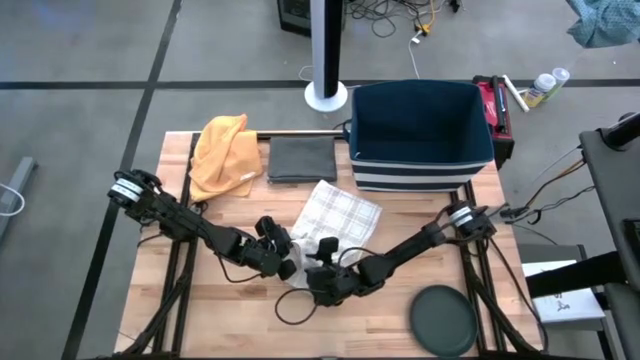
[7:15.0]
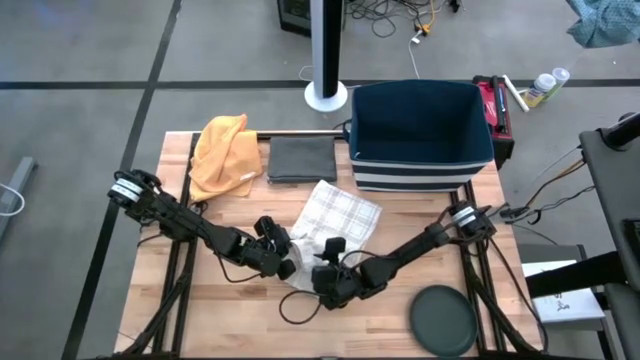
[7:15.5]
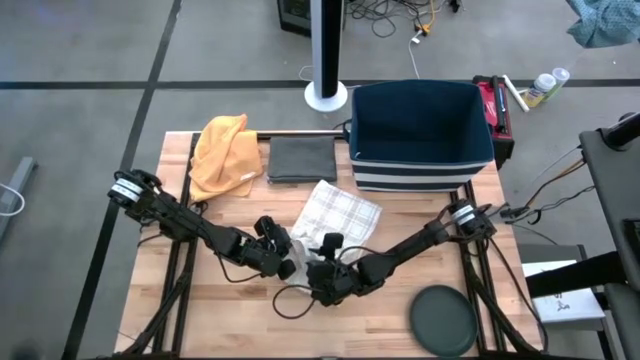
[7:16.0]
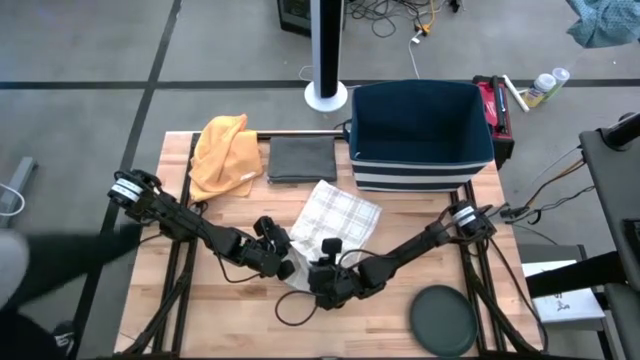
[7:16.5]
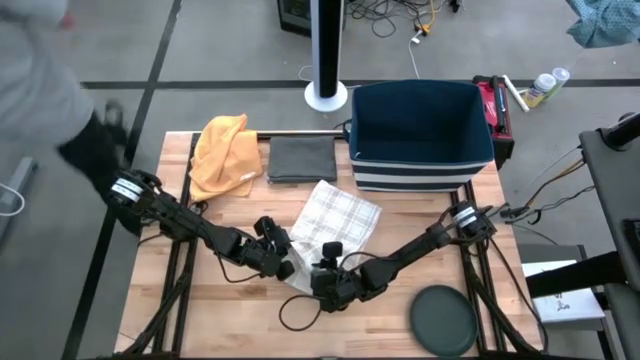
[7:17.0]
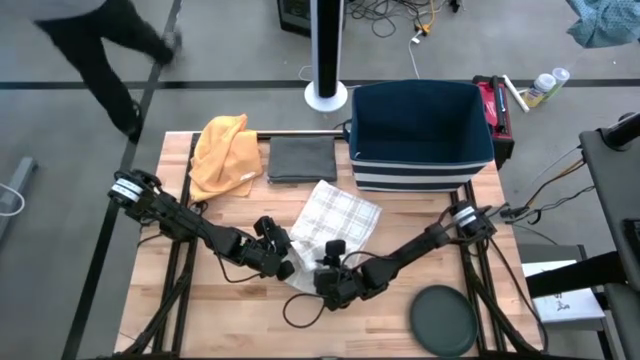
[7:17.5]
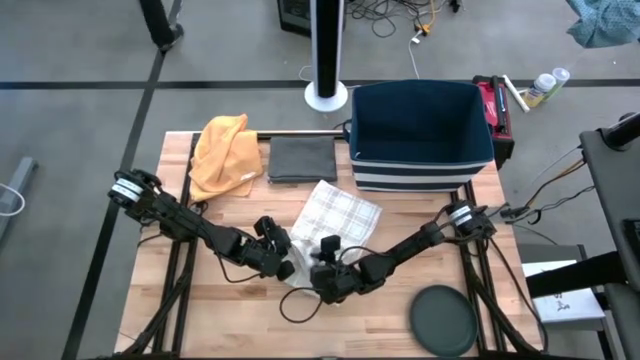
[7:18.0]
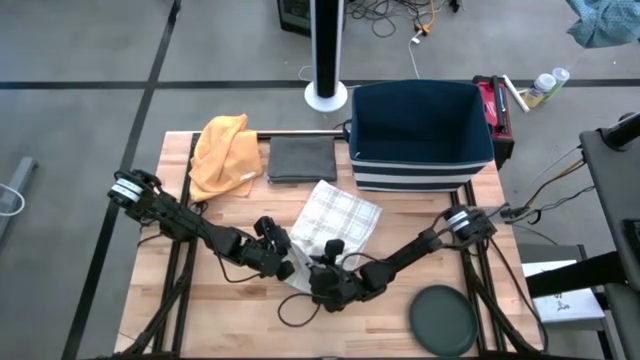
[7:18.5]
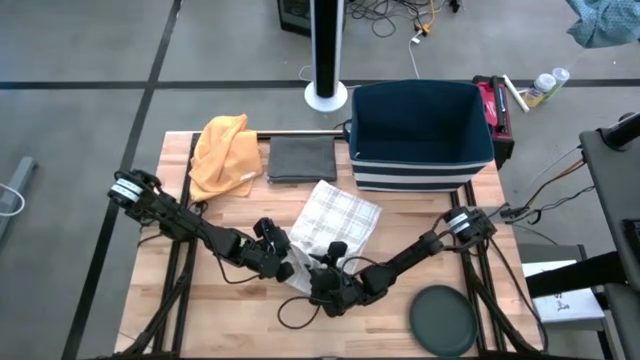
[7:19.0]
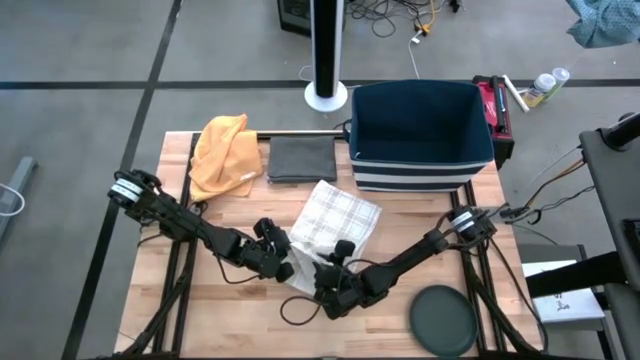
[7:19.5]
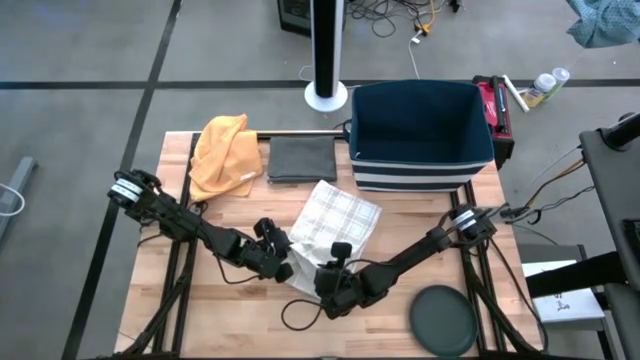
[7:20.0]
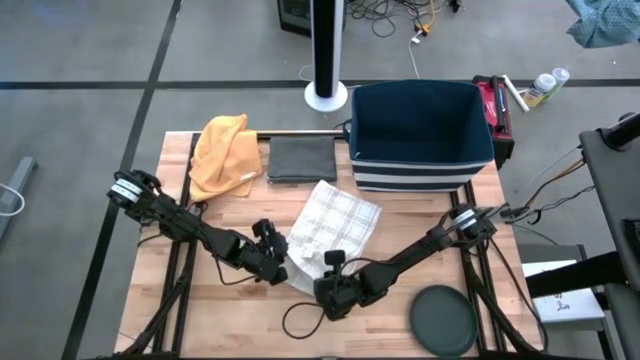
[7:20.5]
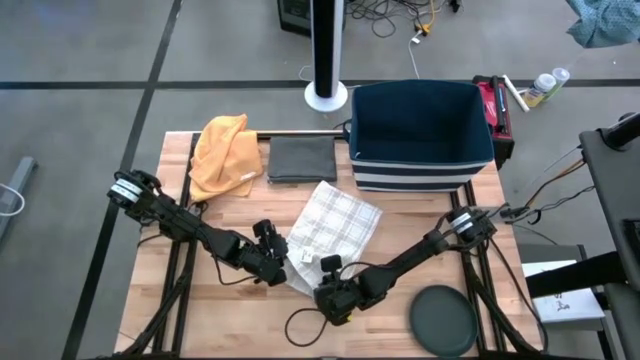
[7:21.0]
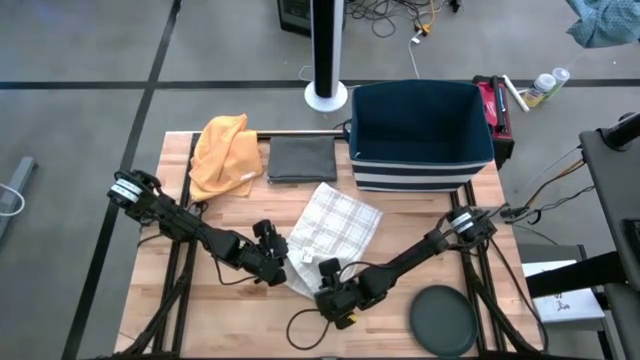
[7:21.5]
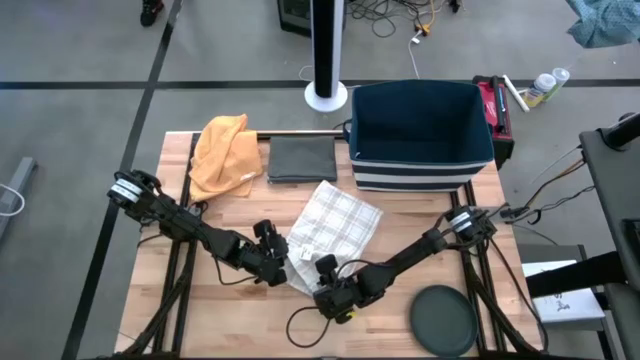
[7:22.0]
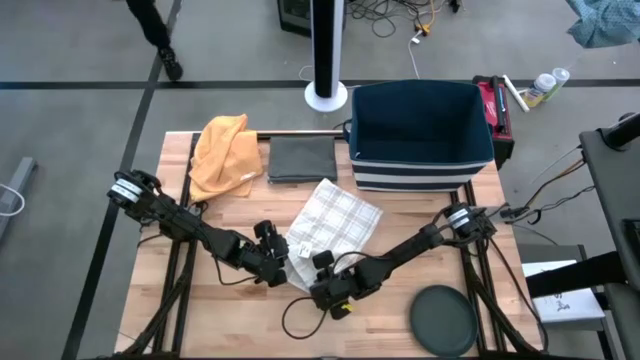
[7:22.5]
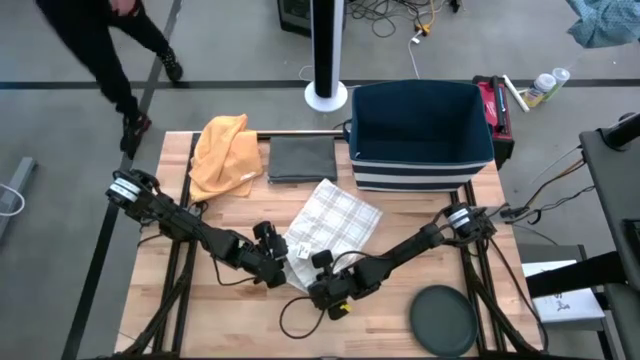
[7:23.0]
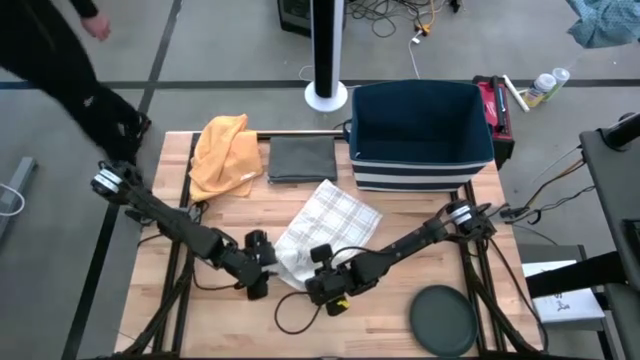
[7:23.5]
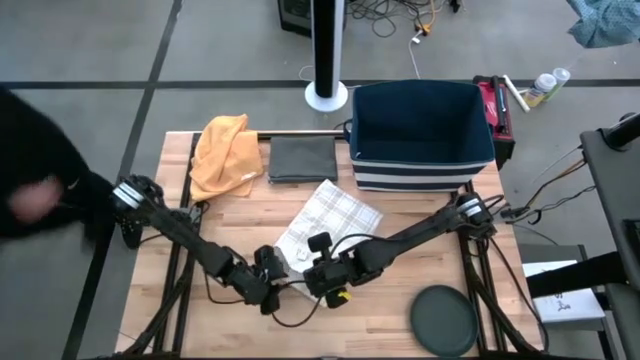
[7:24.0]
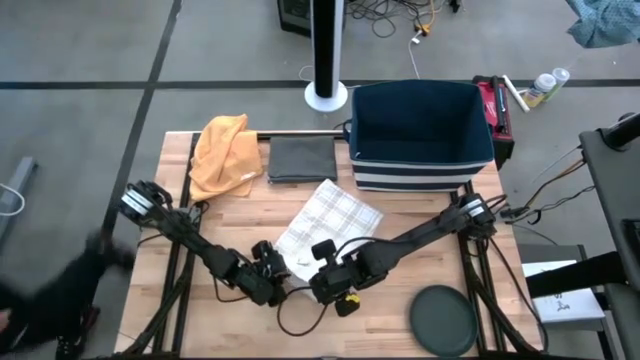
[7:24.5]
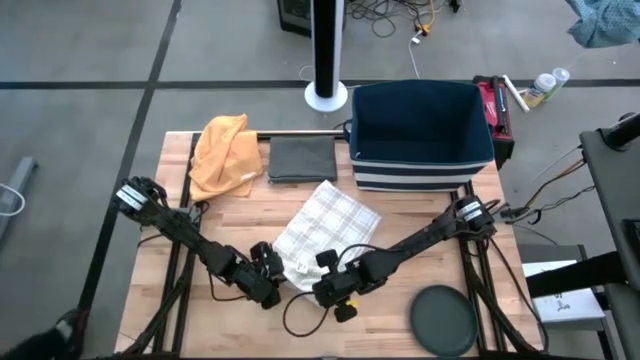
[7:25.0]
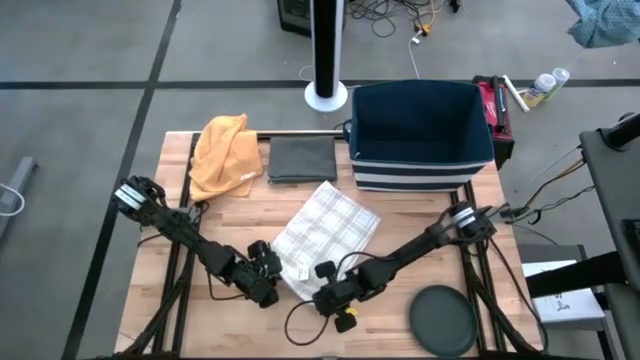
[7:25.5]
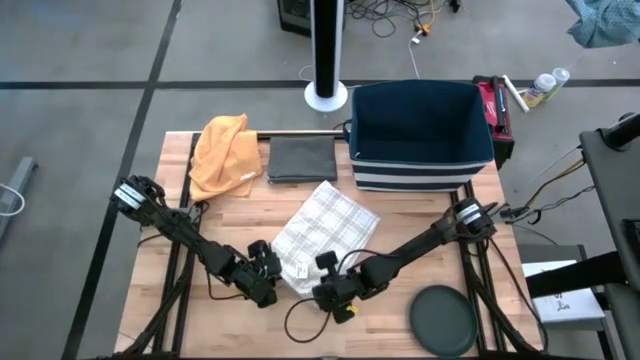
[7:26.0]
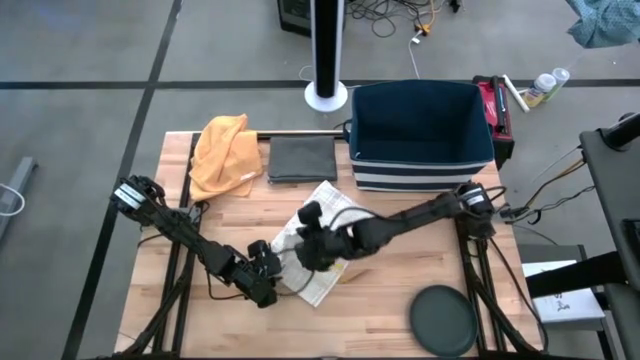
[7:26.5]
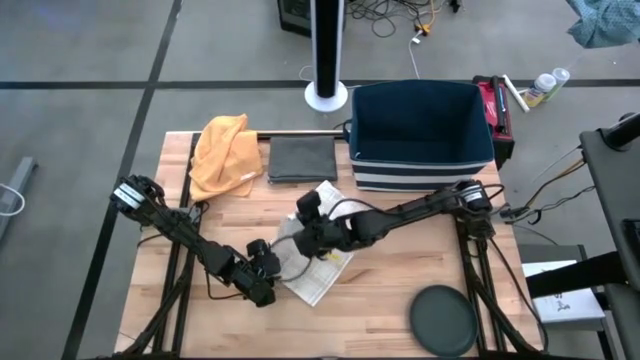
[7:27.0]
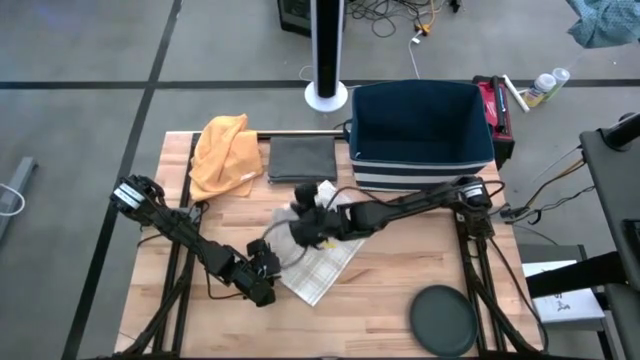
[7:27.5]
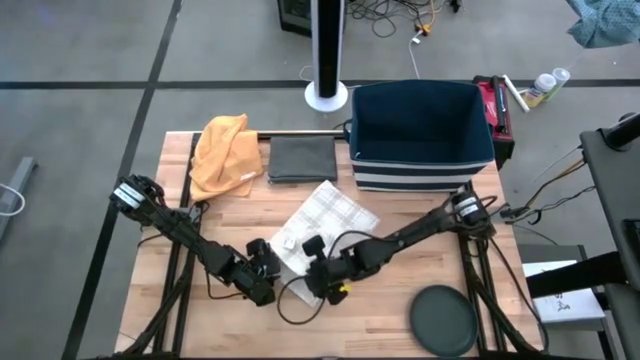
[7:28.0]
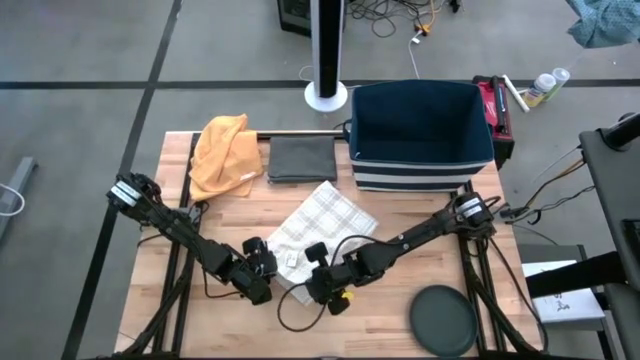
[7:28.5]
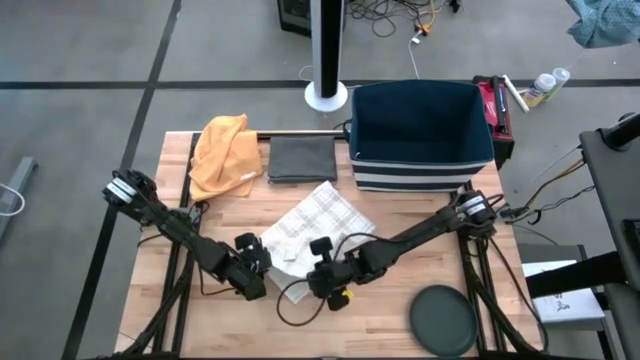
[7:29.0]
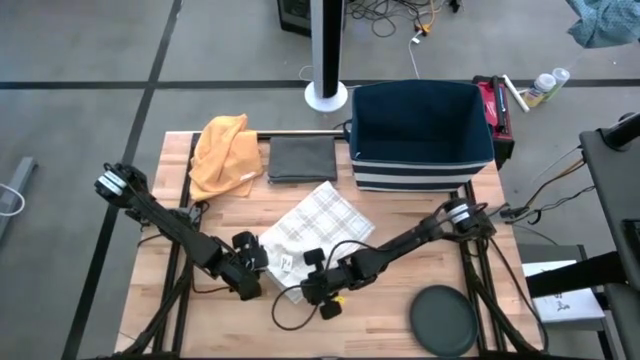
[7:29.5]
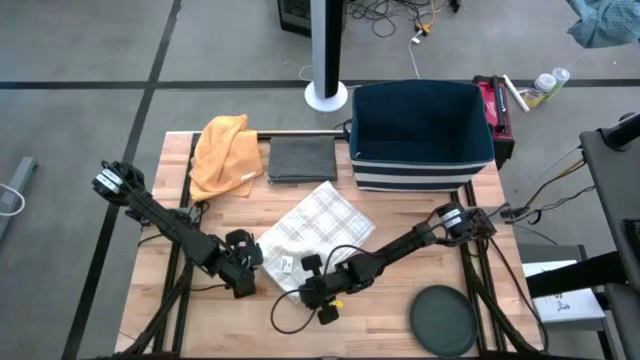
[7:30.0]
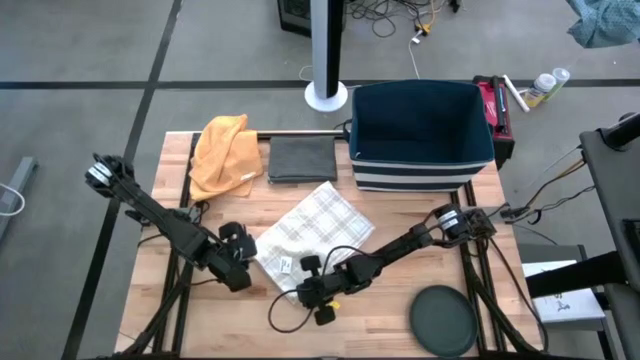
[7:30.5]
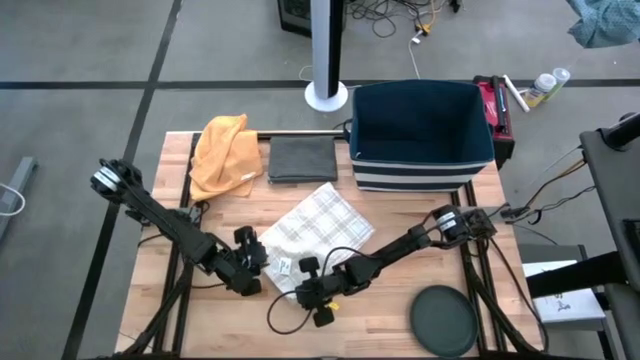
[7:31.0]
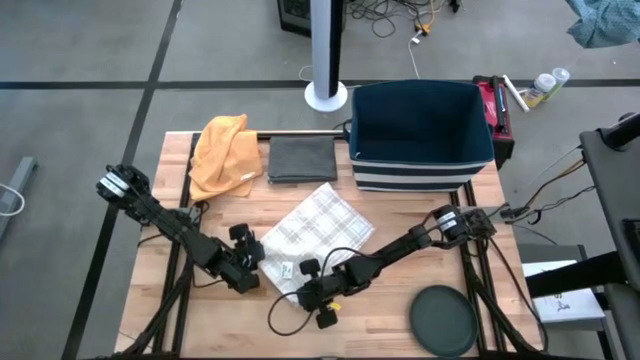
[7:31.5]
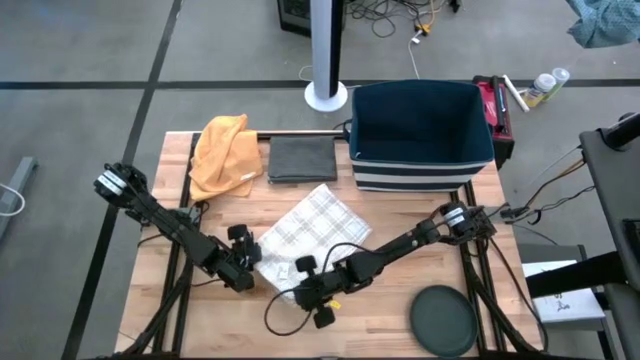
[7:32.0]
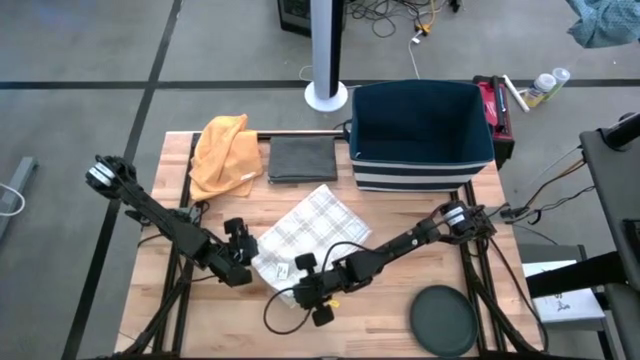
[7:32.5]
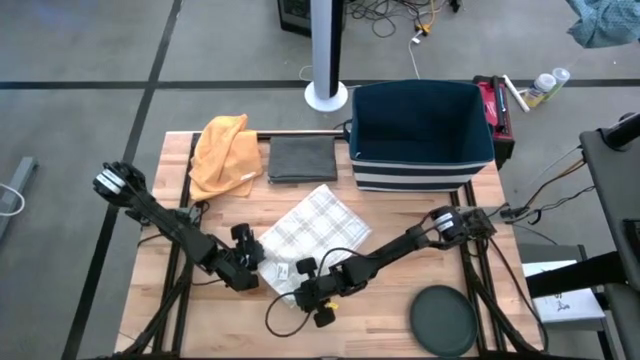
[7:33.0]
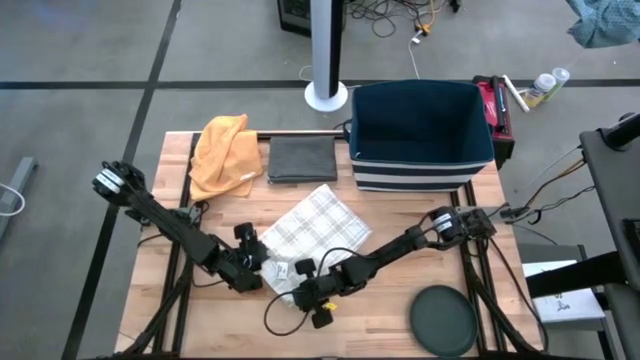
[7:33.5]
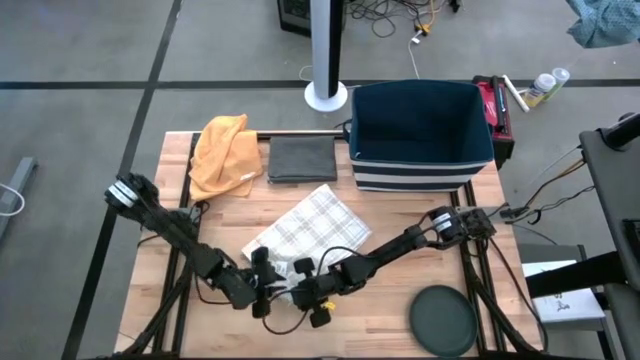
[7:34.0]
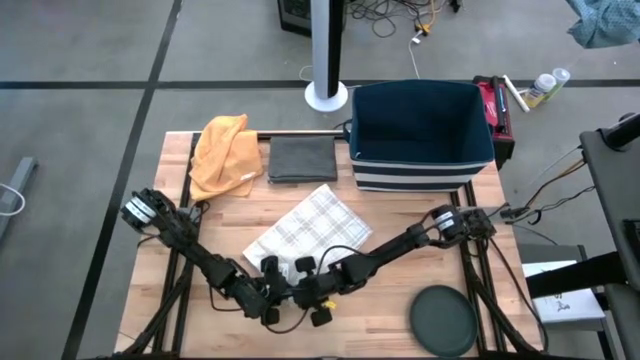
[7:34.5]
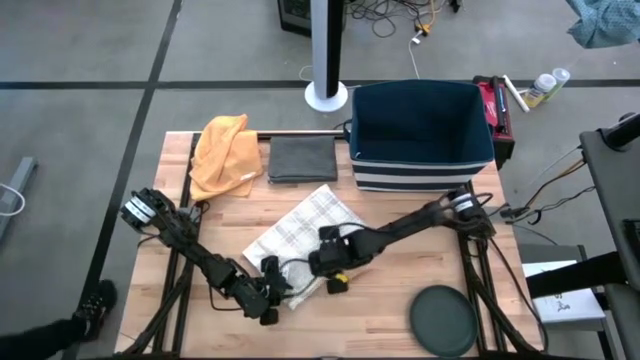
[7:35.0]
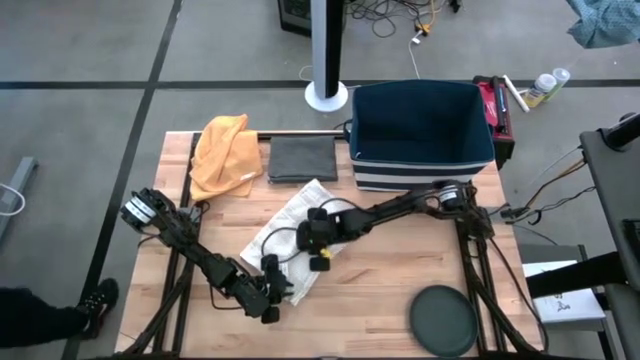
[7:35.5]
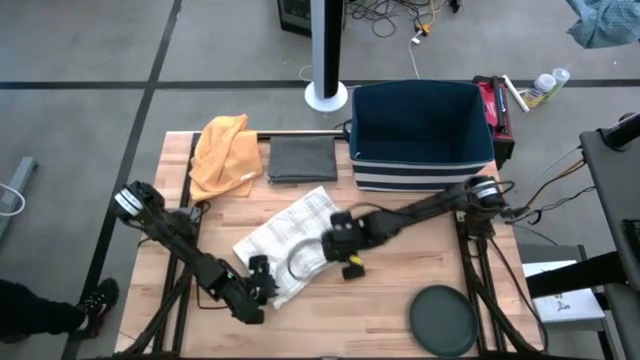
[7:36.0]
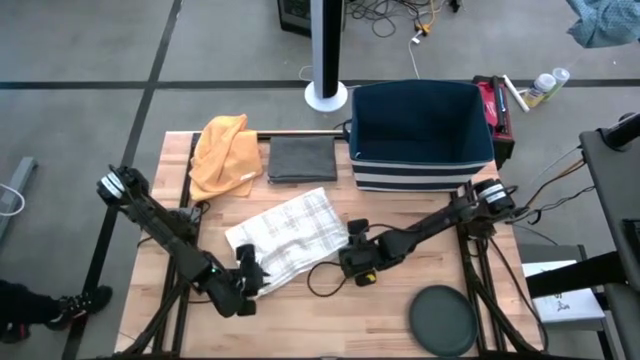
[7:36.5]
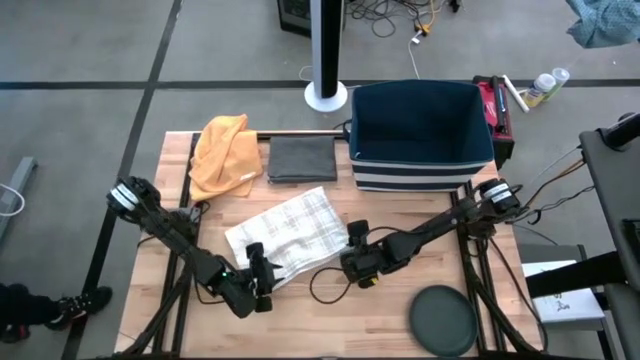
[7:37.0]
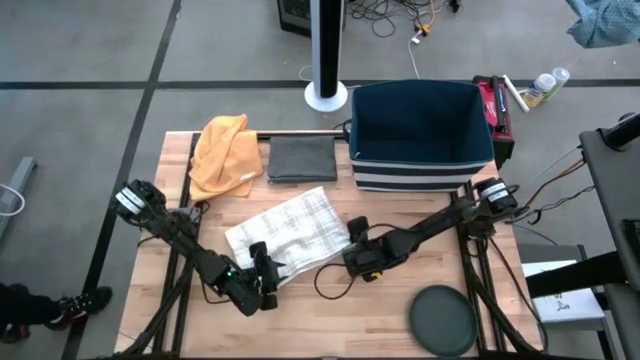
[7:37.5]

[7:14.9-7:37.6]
Task: Fold kitchen towel into neat rectangle
Fold the white patterned towel
